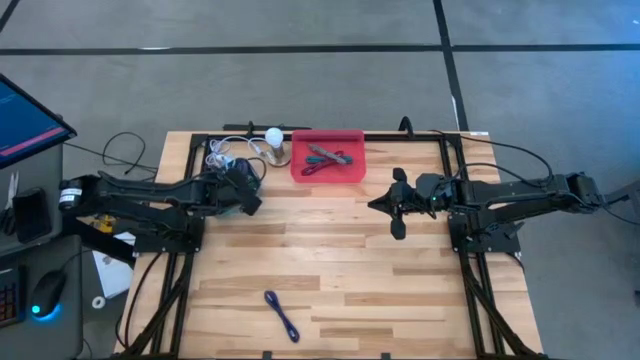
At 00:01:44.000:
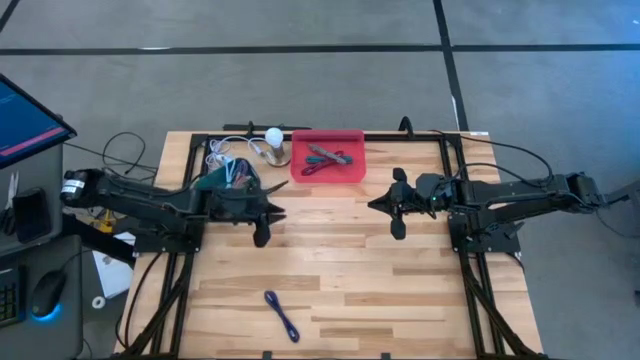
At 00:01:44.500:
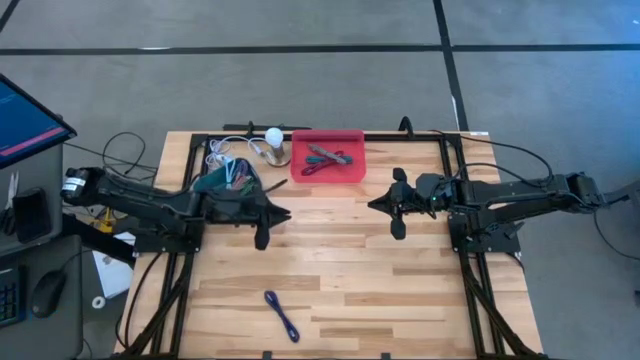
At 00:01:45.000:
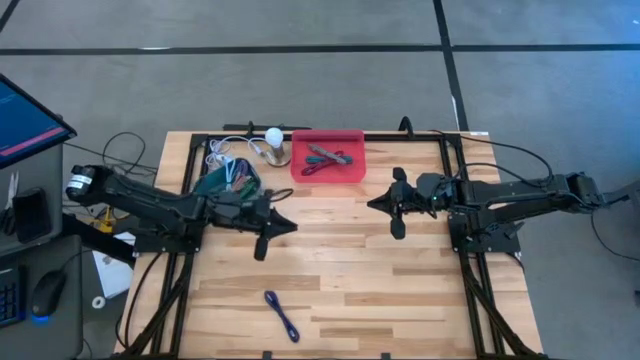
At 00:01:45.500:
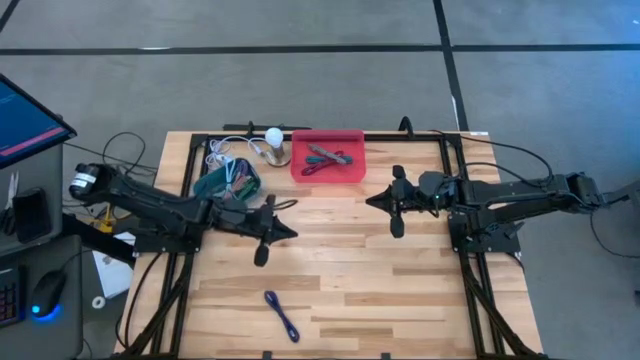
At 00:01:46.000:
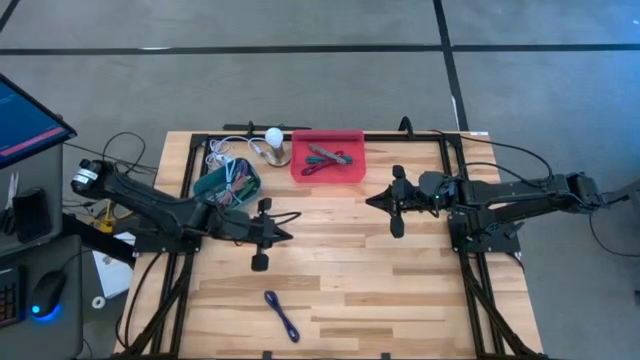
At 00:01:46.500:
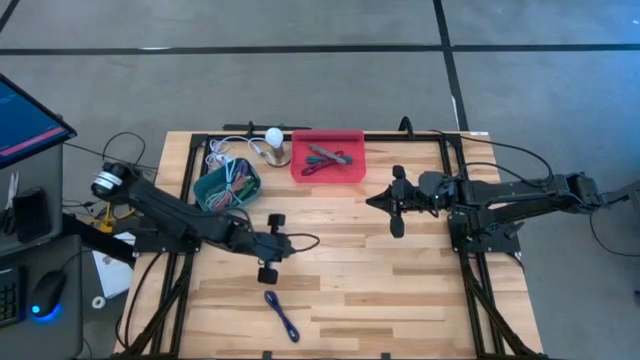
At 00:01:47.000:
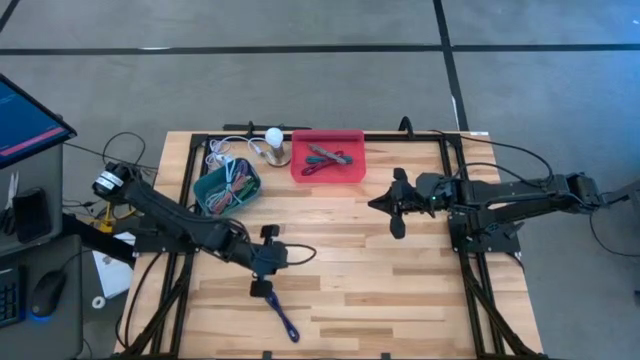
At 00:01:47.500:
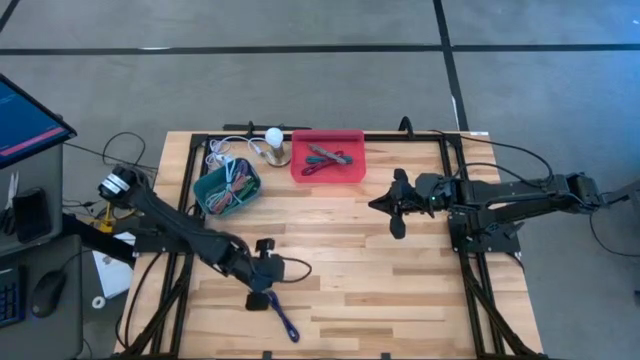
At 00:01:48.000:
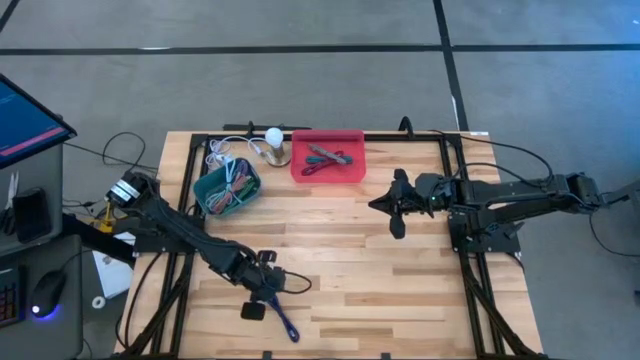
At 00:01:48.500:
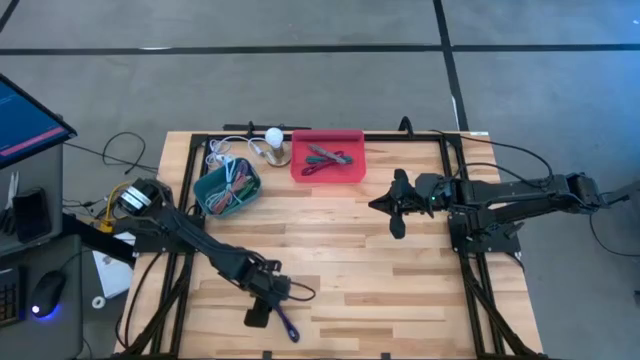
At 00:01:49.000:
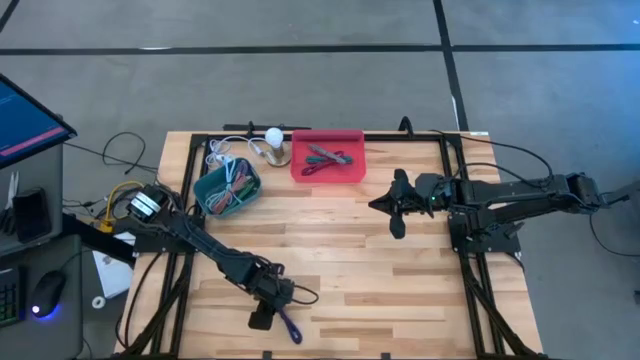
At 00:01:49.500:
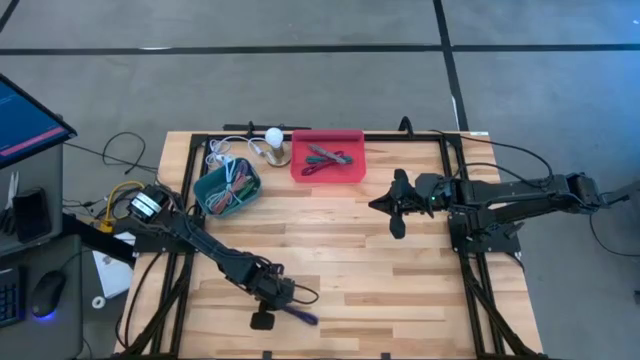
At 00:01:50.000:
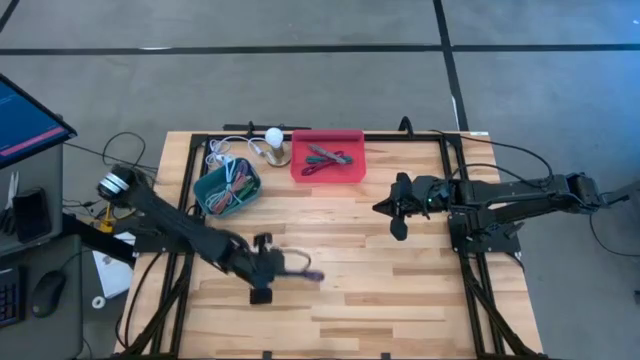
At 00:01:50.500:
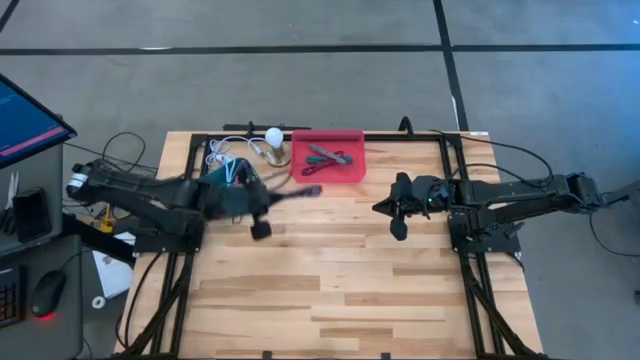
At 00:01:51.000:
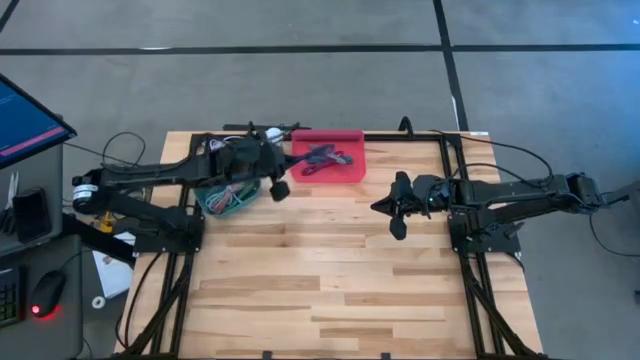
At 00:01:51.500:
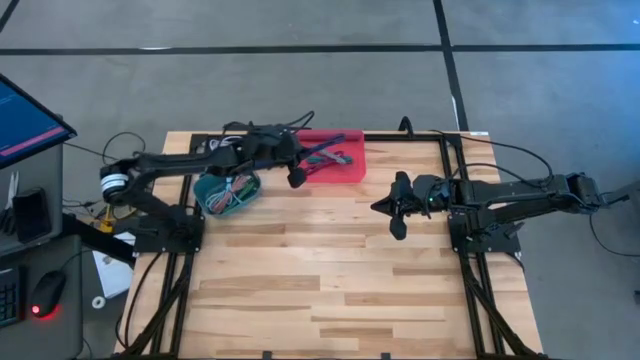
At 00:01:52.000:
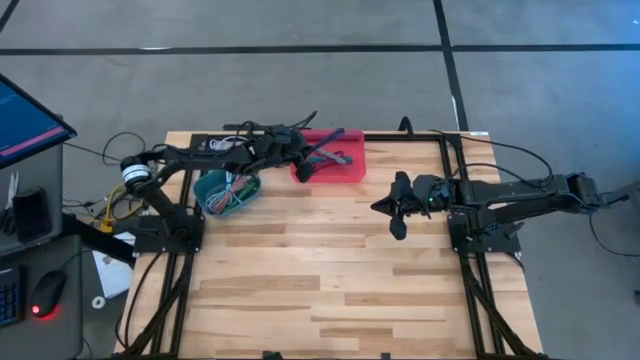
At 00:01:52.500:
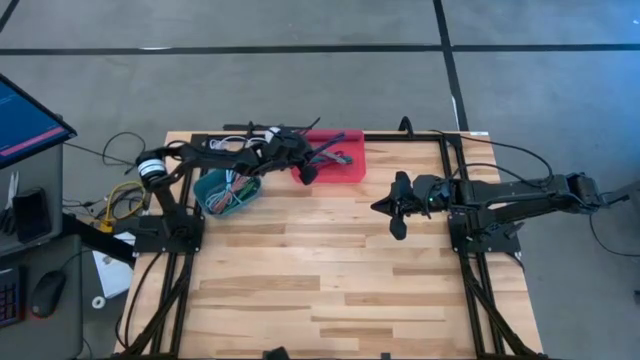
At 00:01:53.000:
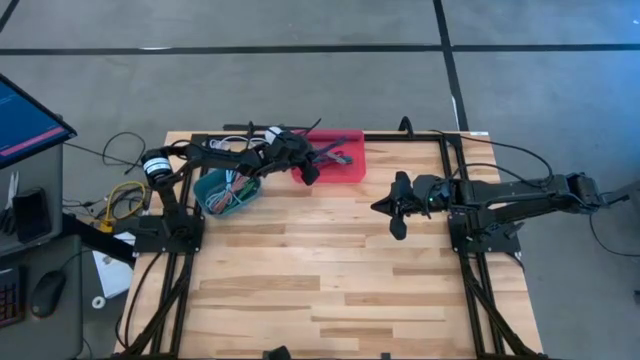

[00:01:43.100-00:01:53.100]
Task: Pick & Place USB Port
Put the black and violet USB cable into the pink bin

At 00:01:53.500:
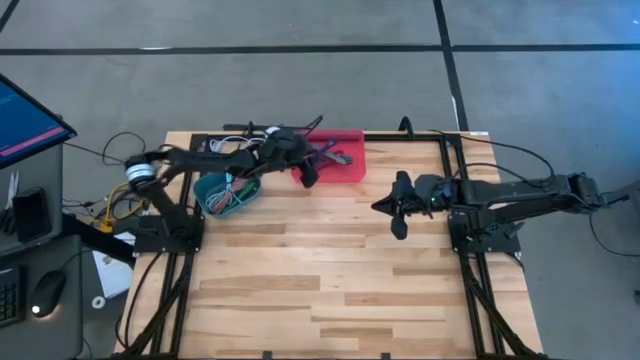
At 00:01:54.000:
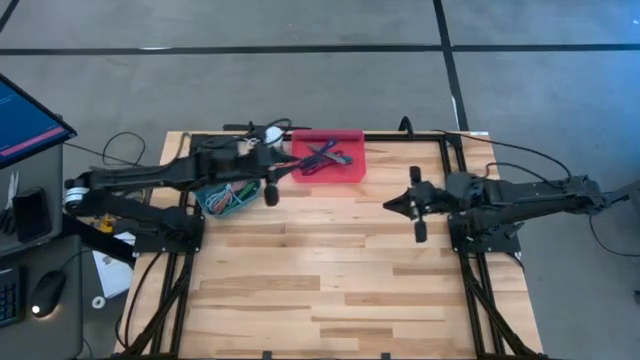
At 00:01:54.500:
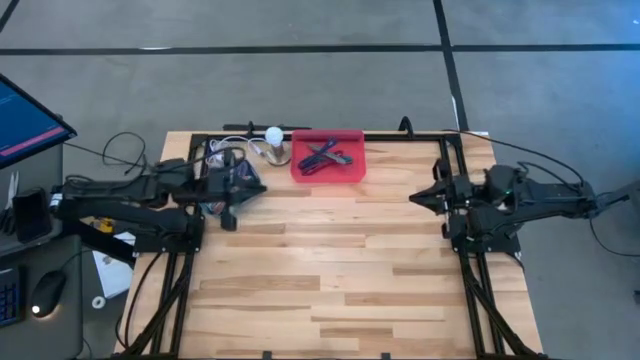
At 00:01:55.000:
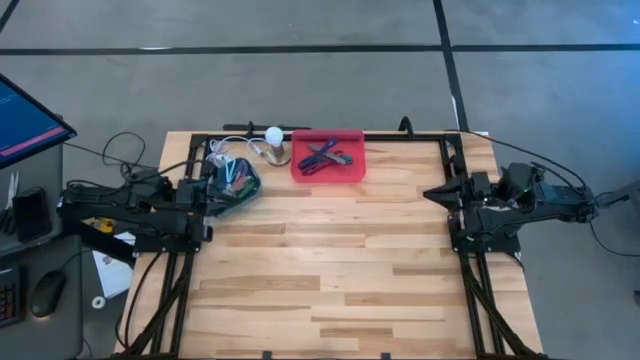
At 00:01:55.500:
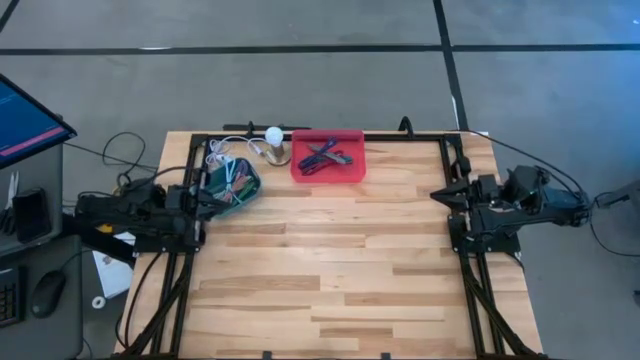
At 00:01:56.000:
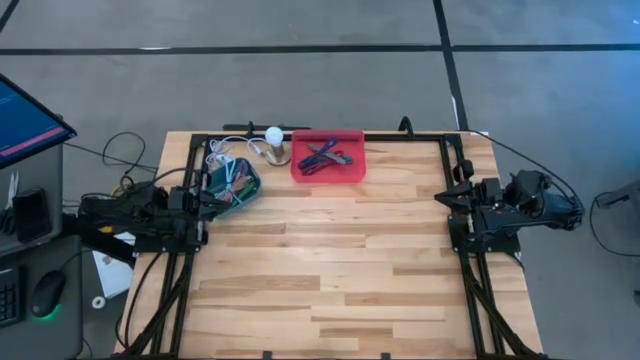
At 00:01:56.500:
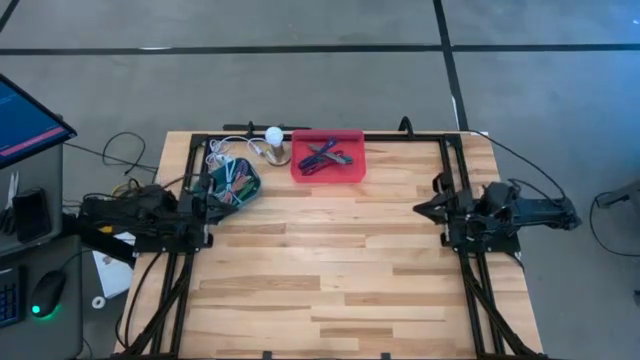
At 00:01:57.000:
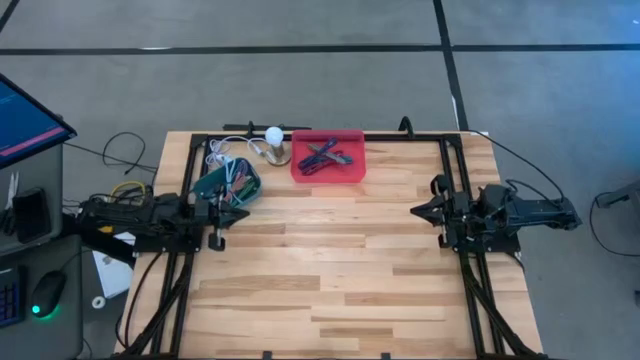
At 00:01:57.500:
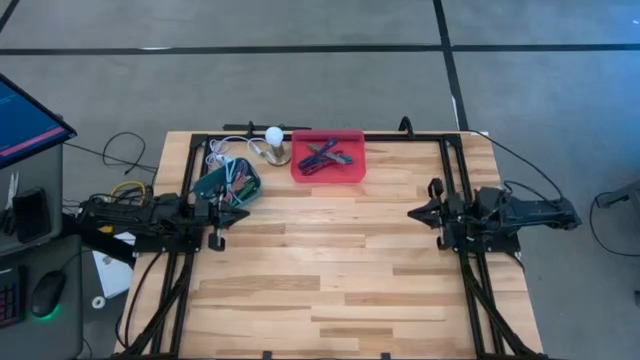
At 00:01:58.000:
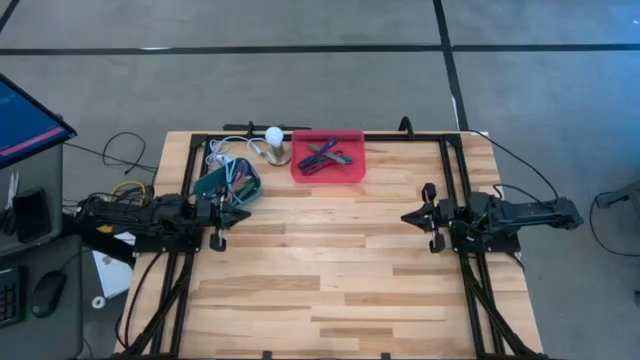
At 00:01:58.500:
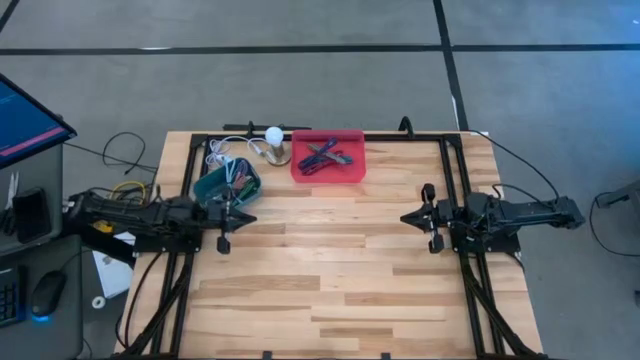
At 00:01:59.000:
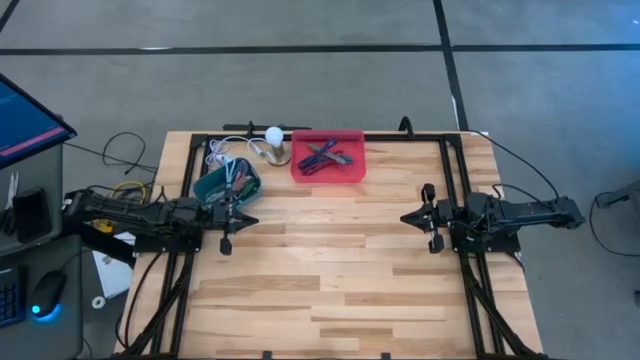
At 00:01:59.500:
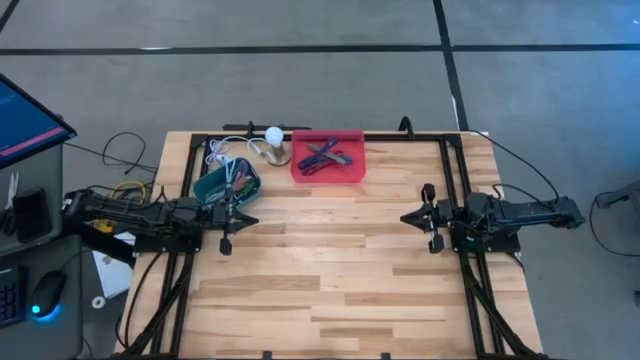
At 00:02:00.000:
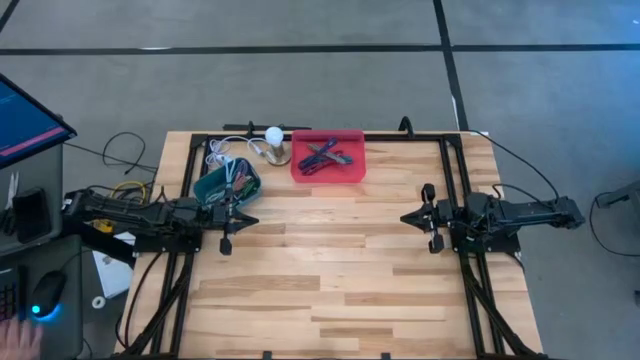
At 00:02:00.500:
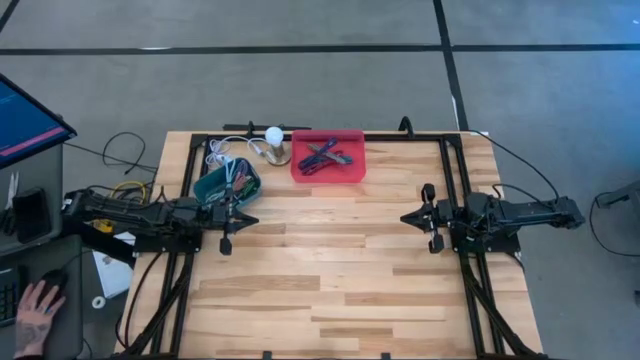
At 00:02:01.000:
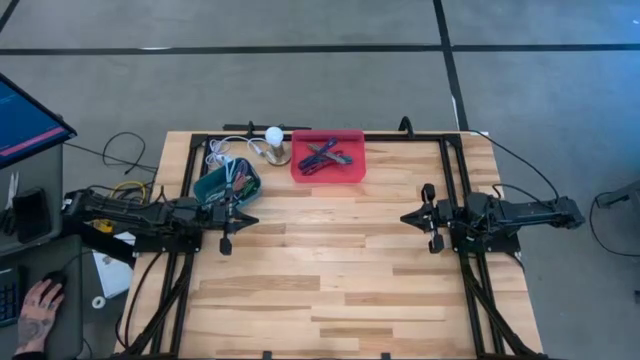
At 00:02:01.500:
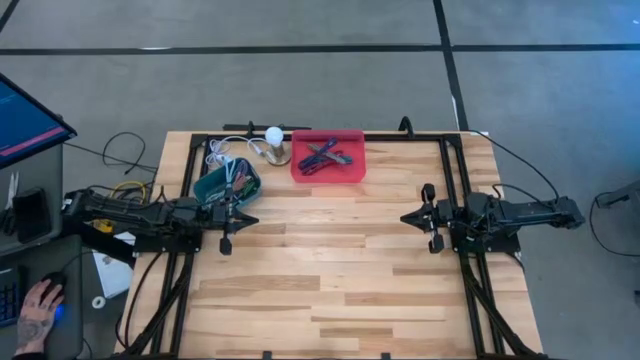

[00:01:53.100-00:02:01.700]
Return to Home Position

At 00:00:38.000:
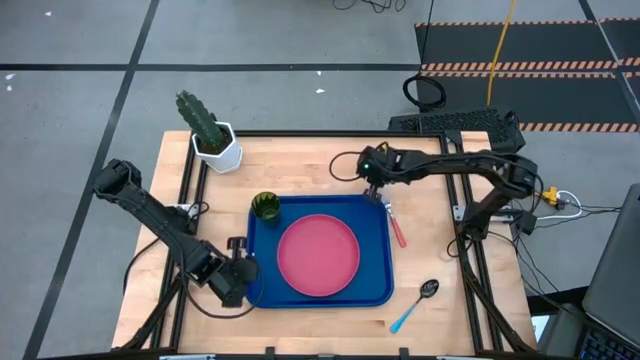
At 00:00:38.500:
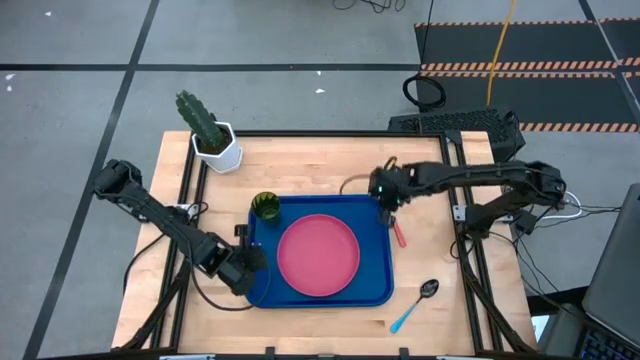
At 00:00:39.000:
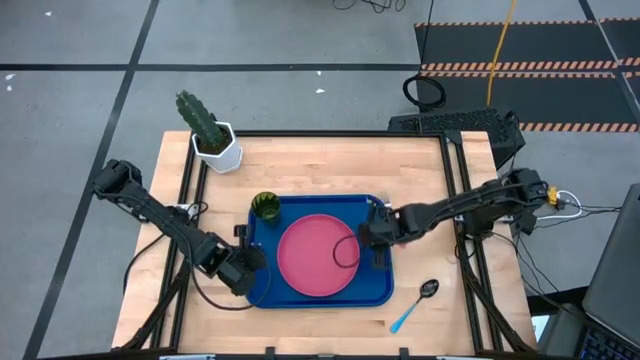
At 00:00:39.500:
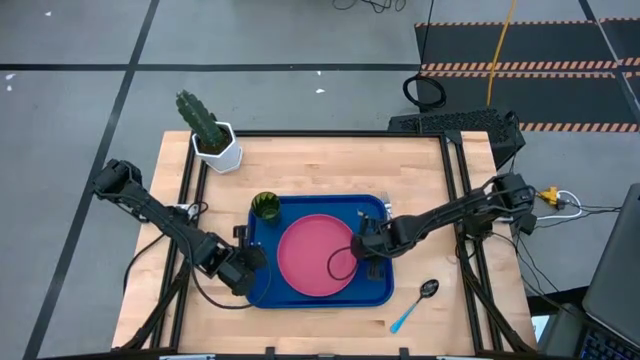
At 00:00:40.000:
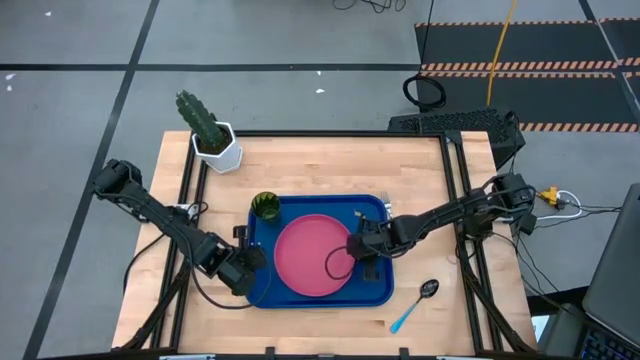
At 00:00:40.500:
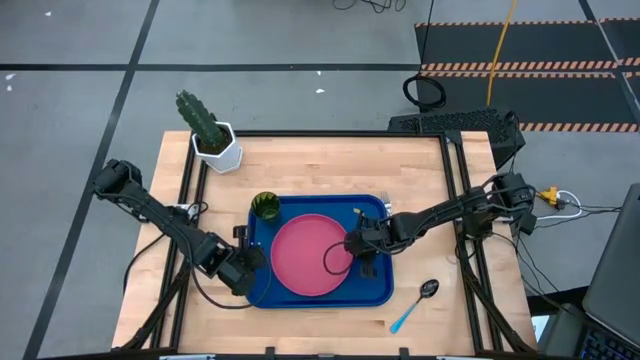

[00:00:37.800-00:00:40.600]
Task: Pick and place plate/cup/fork/spoon on tray
Adjust the pink plate
